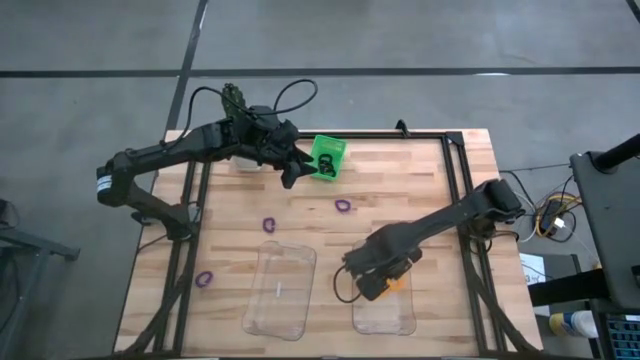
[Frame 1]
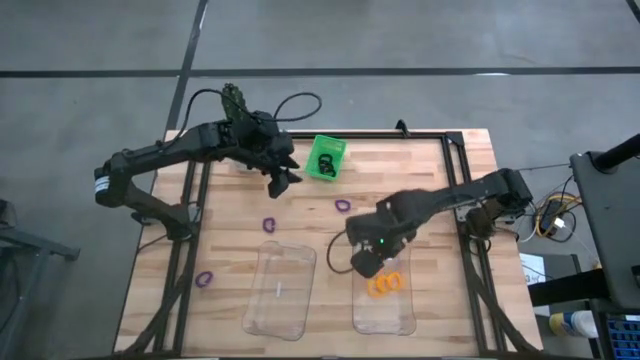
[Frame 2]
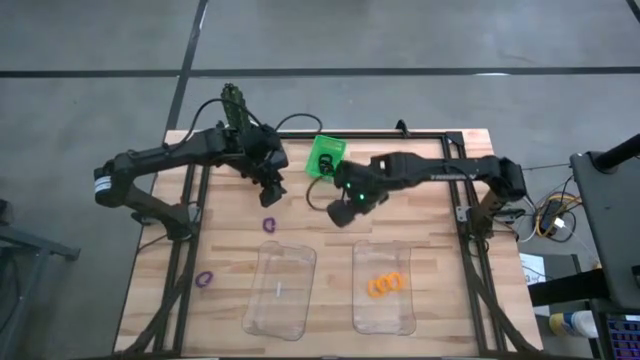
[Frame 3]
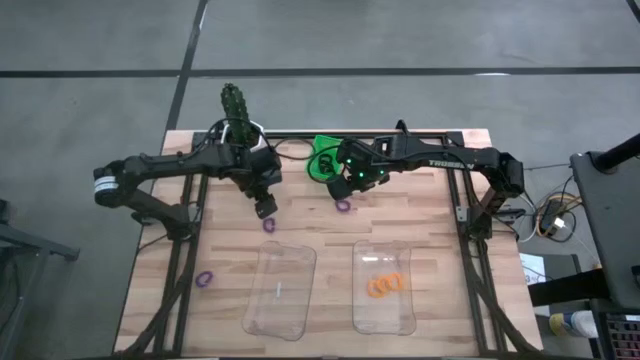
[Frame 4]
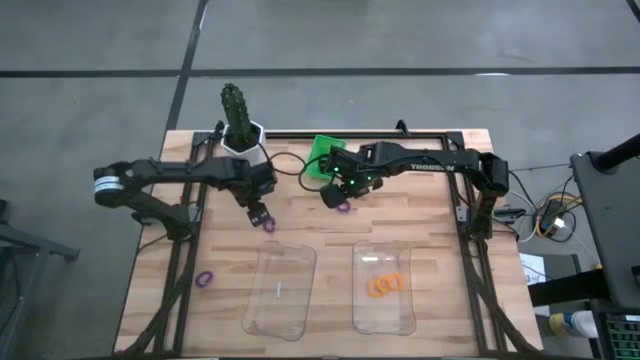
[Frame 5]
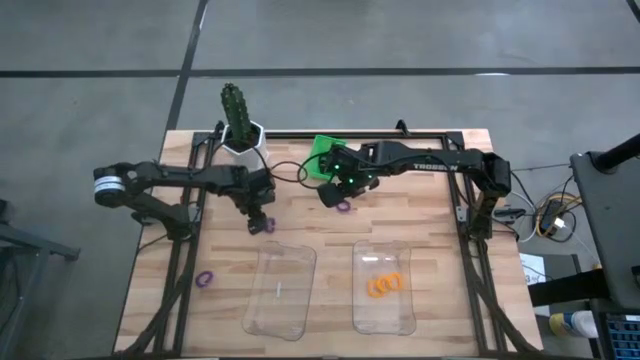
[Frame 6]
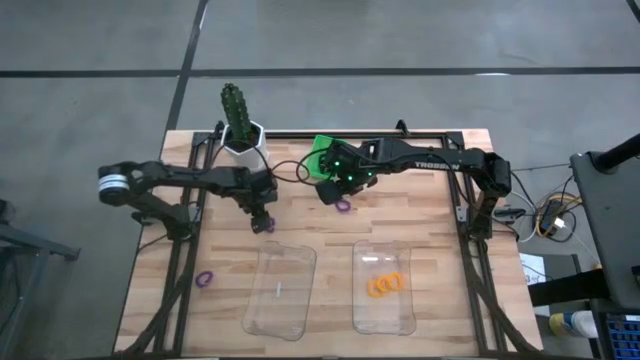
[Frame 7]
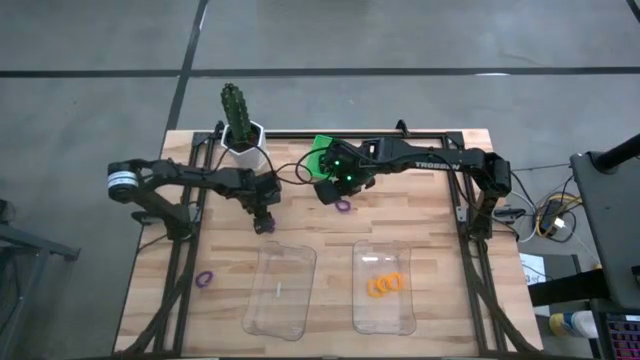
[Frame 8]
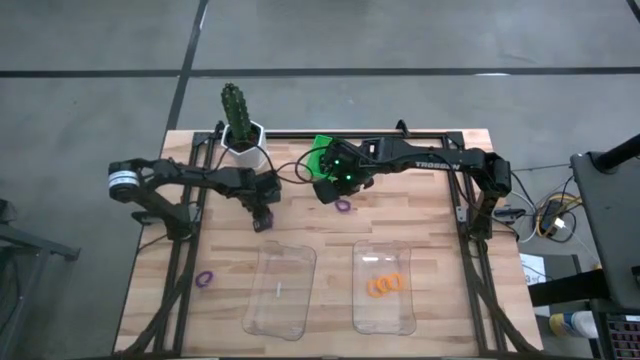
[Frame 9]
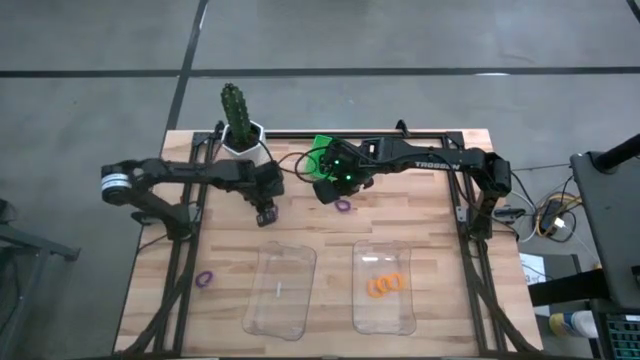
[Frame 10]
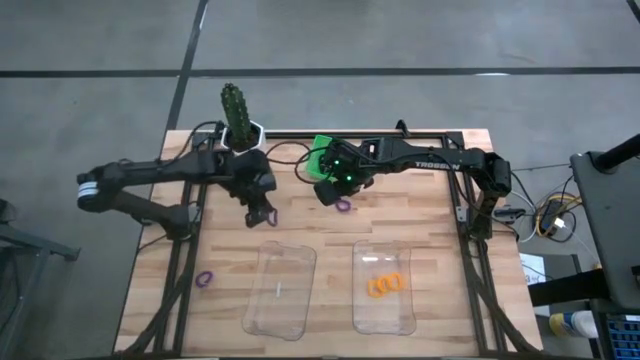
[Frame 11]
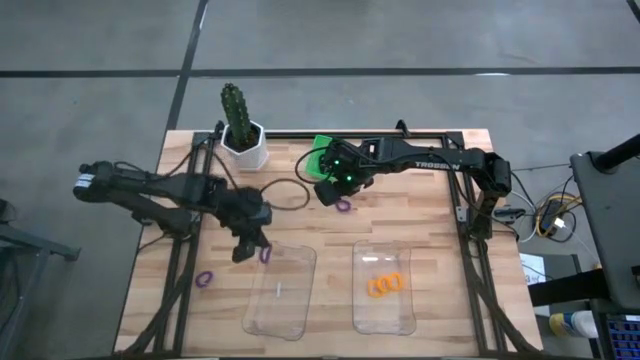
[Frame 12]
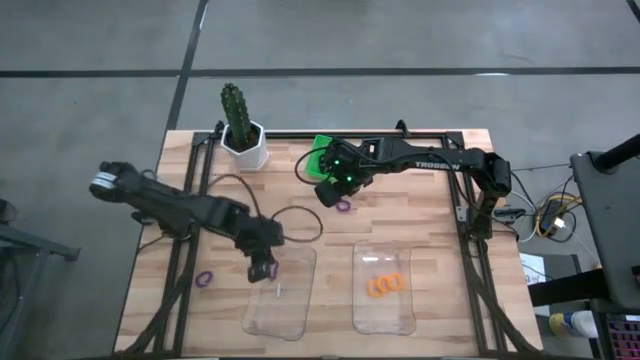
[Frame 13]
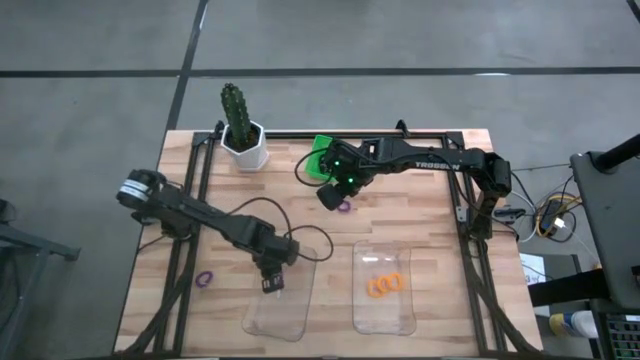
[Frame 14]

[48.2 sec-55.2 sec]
Task: Sort spring keychains
Put the middle violet spring keychain into the left transparent bin

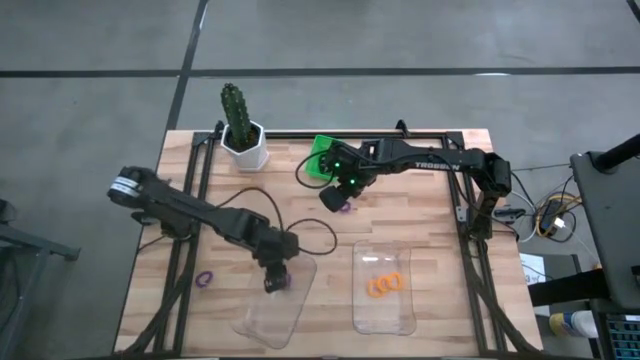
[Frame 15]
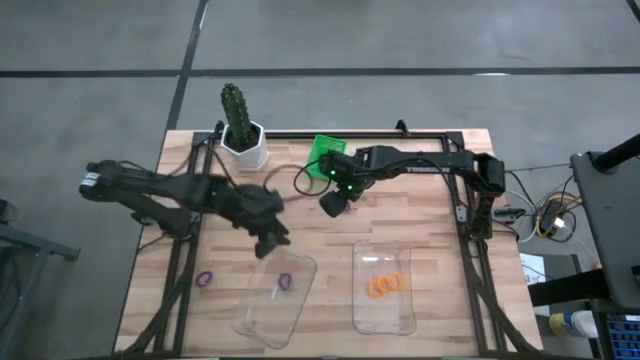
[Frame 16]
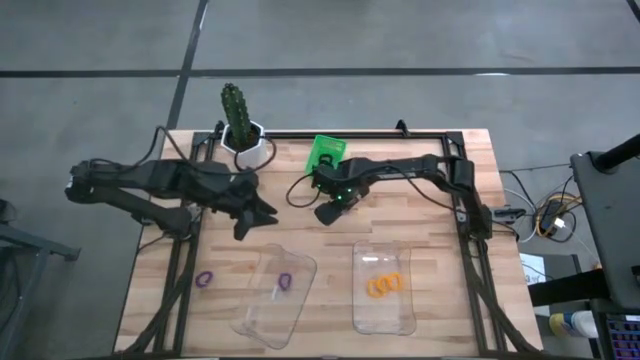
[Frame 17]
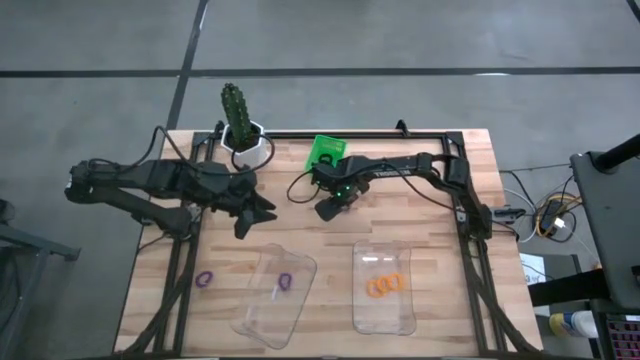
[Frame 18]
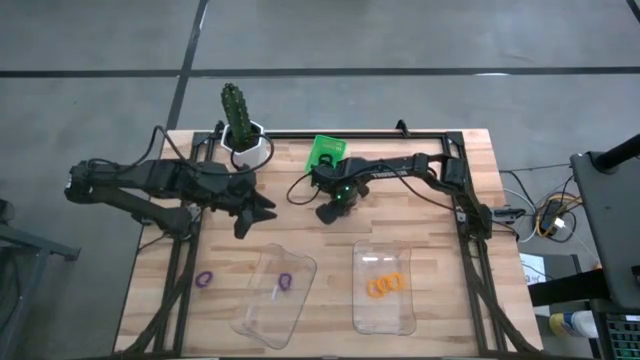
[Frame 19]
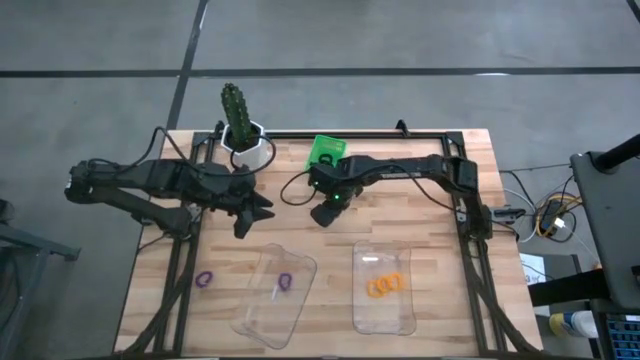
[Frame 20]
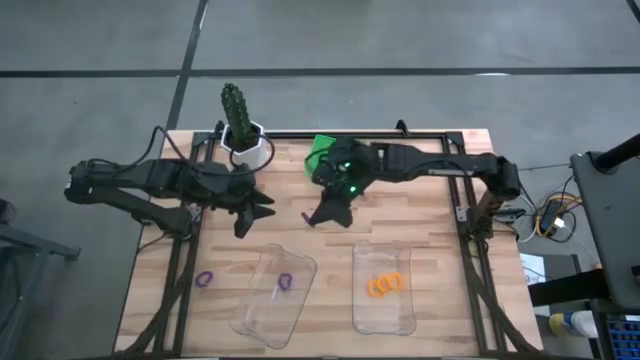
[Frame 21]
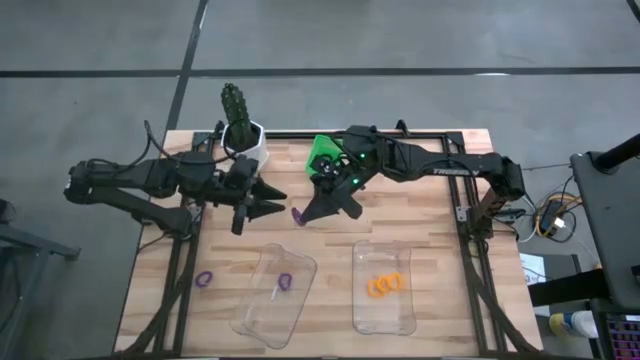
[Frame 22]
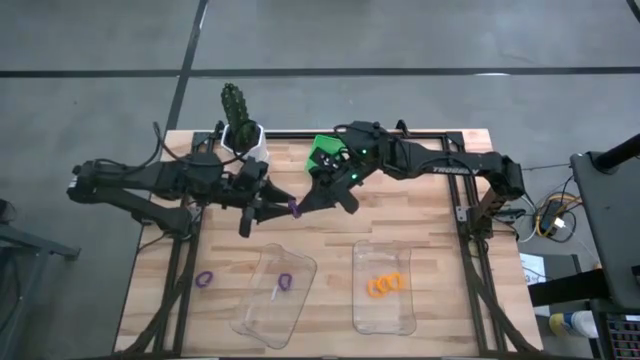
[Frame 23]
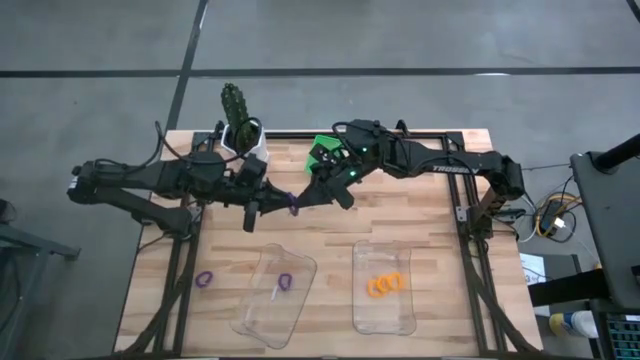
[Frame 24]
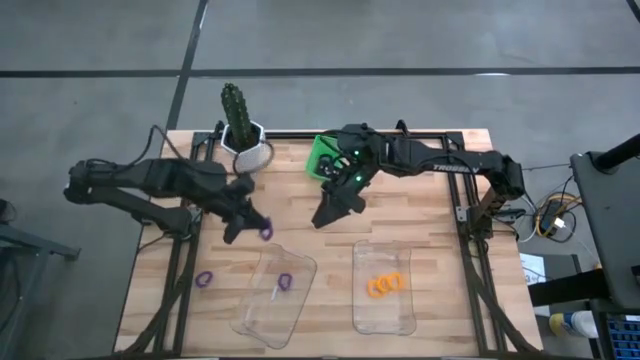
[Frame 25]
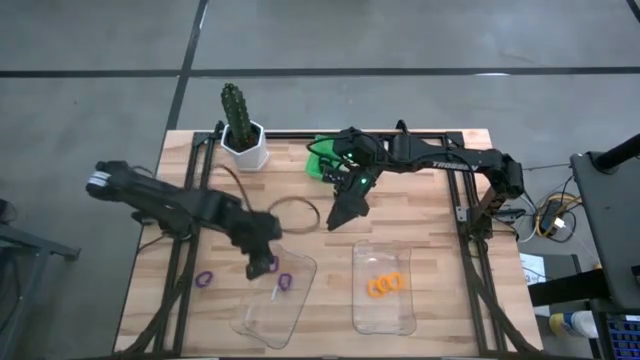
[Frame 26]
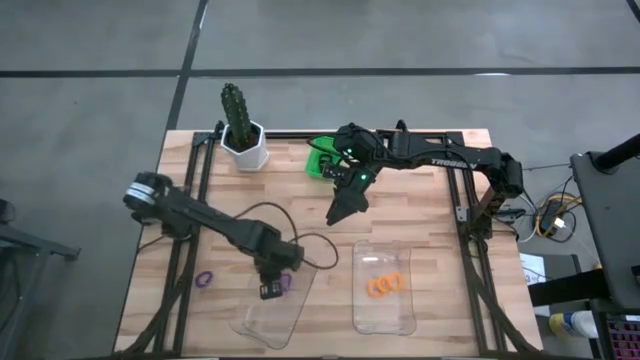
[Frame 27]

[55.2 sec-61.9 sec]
Put the top violet spring keychain into the left transparent bin

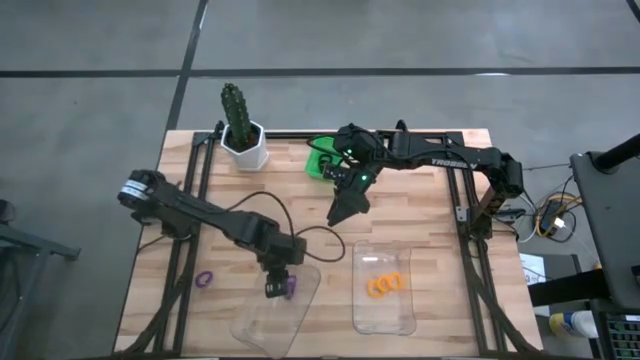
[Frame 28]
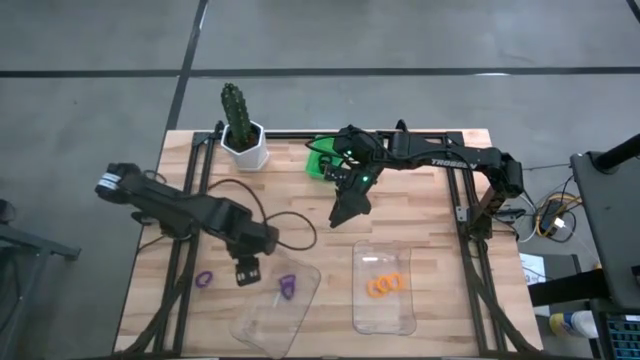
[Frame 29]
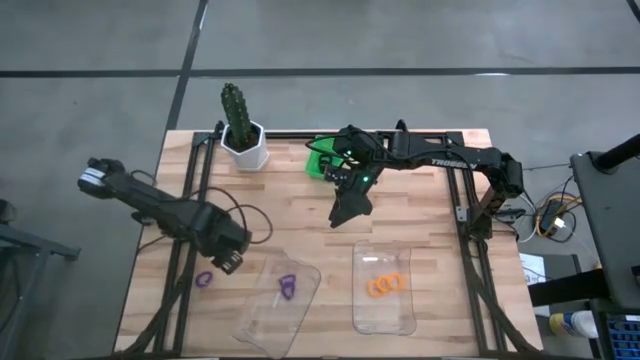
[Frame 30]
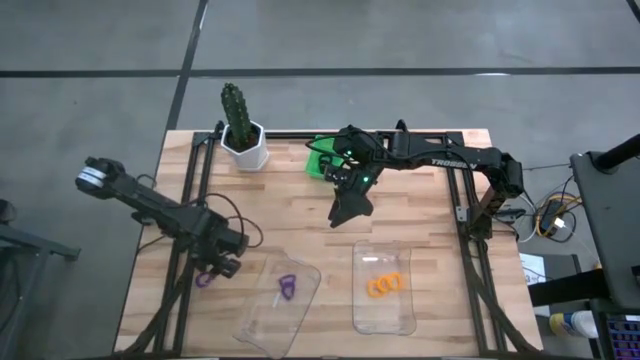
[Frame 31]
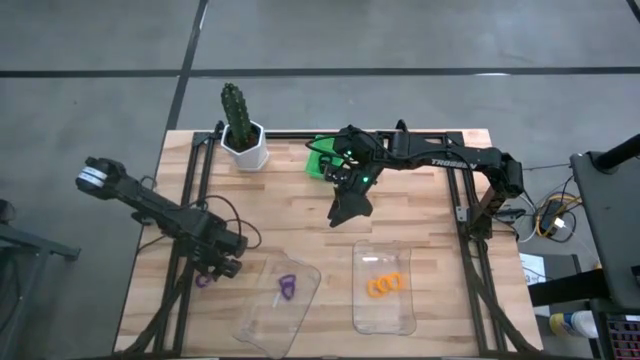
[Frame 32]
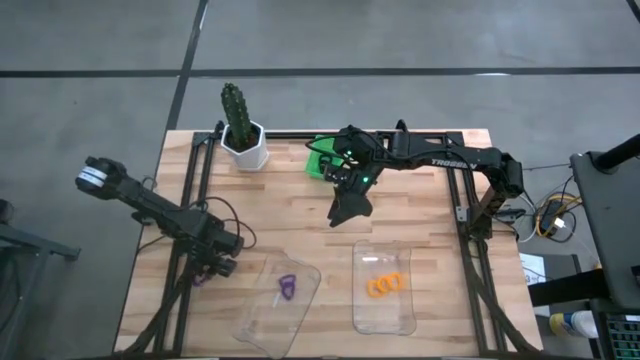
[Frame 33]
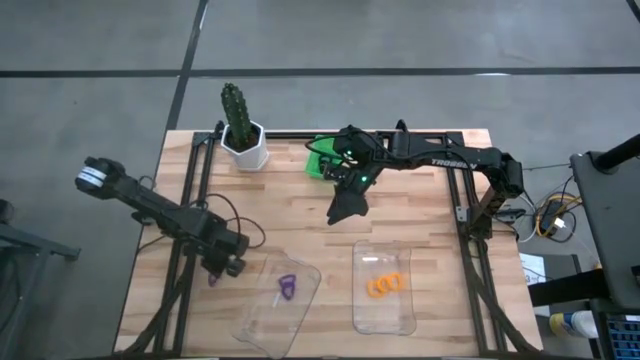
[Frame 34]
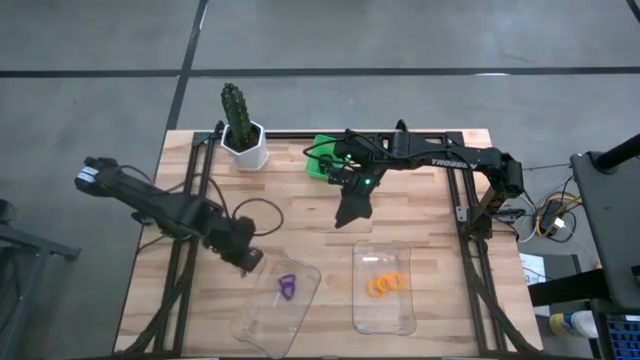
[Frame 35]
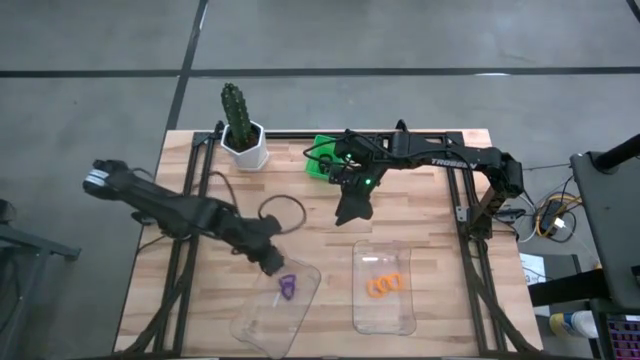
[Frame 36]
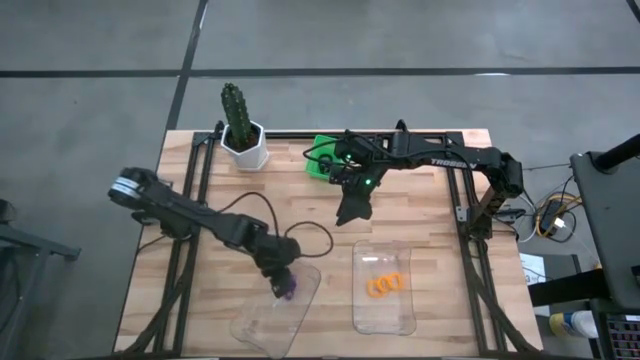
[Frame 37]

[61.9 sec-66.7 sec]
Put the violet spring keychain into the left transparent bin

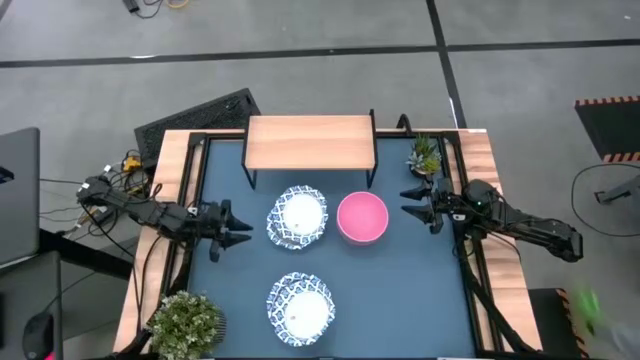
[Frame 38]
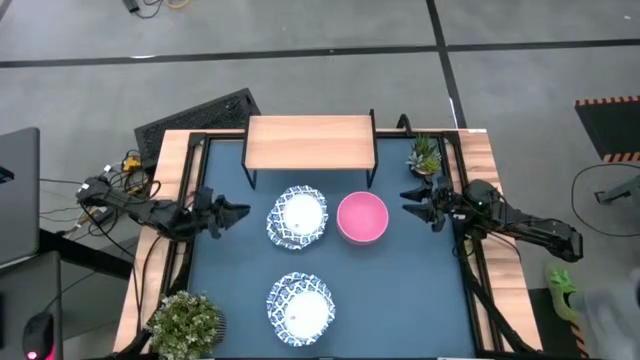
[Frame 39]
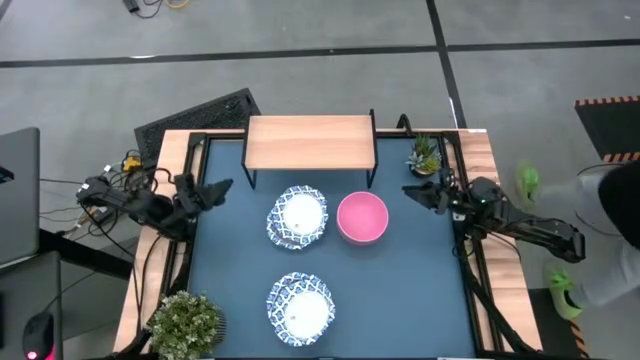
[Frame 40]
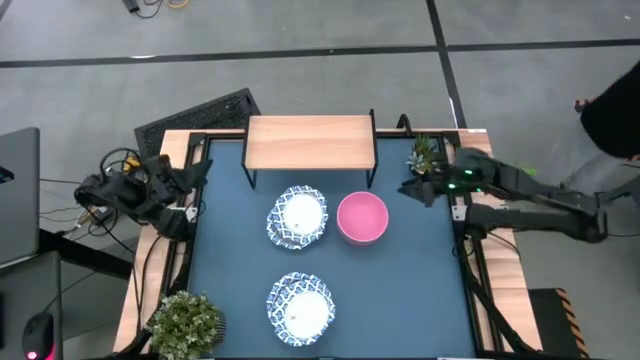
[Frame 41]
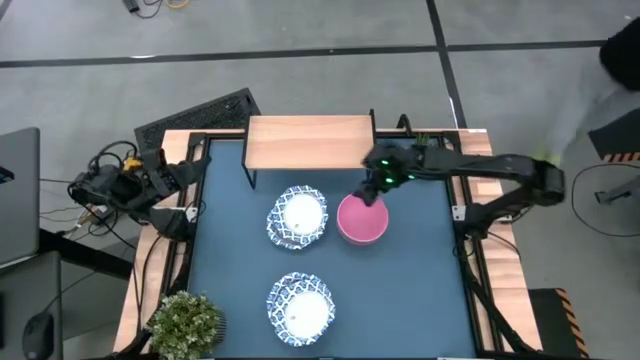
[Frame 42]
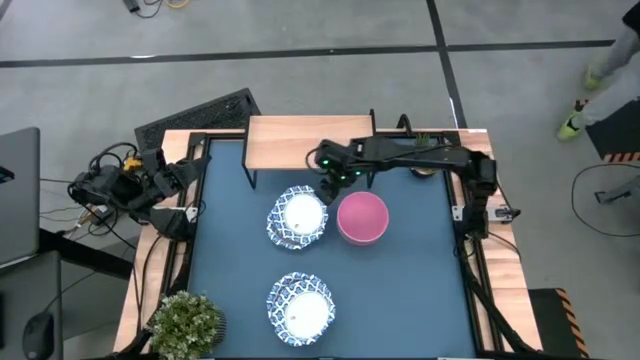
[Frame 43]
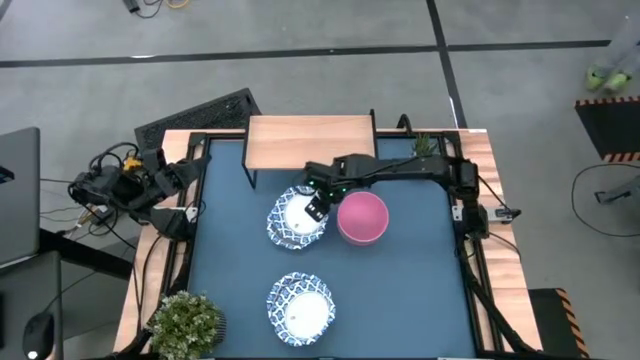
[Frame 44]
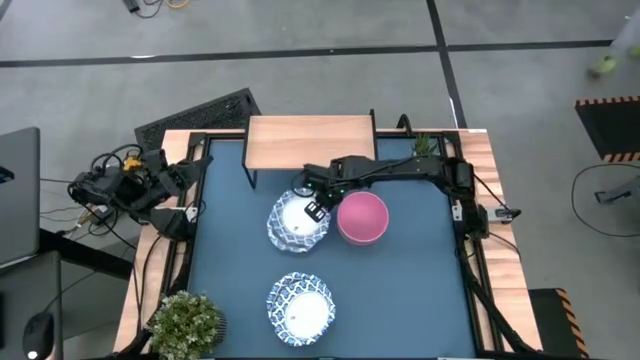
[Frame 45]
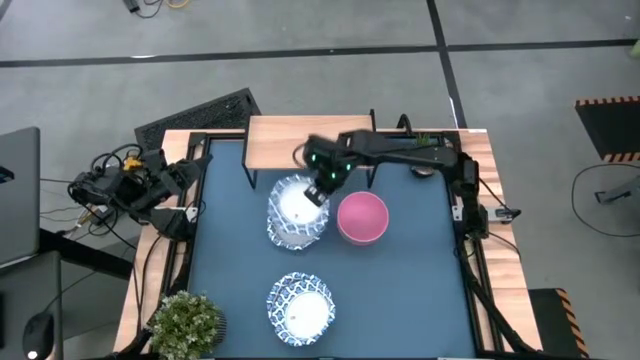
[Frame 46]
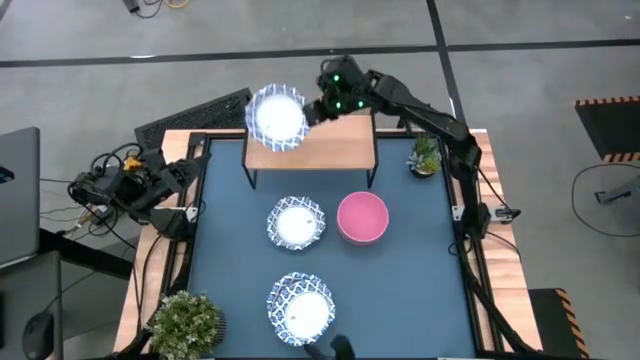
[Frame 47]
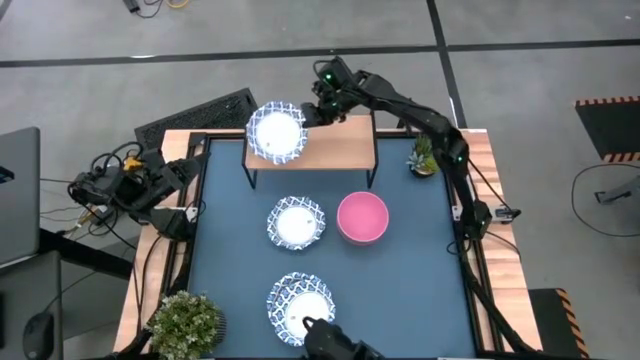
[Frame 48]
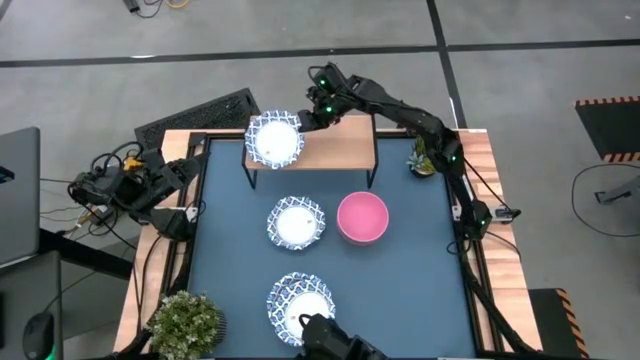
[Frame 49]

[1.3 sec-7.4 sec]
Task: Place and stack bowls onto a shelf
Put the white bowl on the shelf
